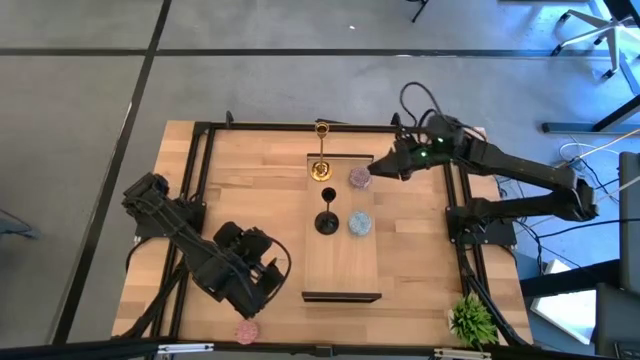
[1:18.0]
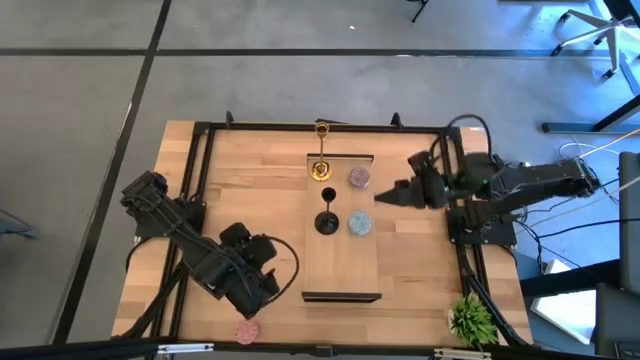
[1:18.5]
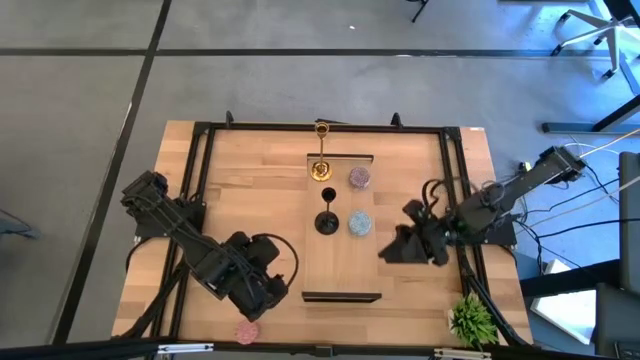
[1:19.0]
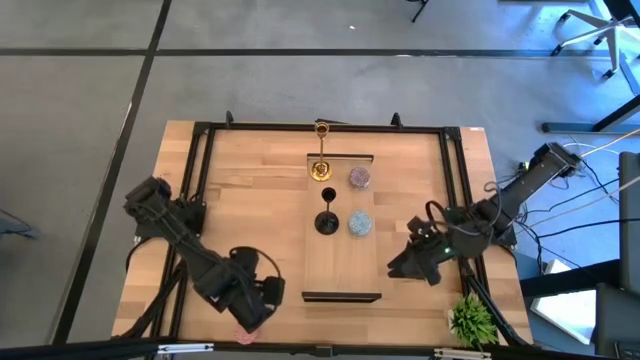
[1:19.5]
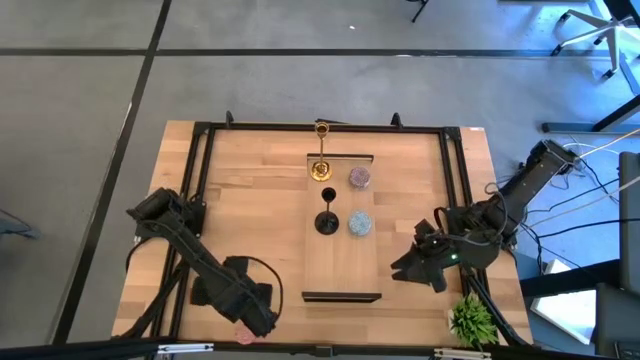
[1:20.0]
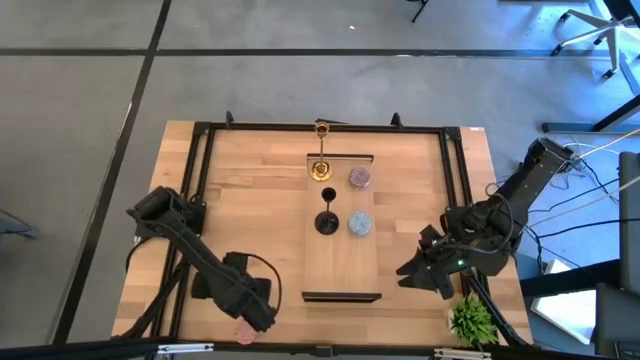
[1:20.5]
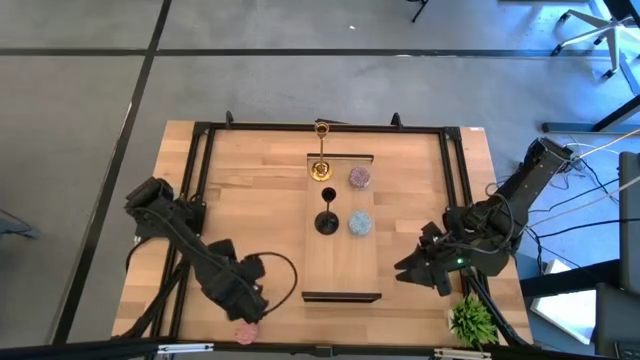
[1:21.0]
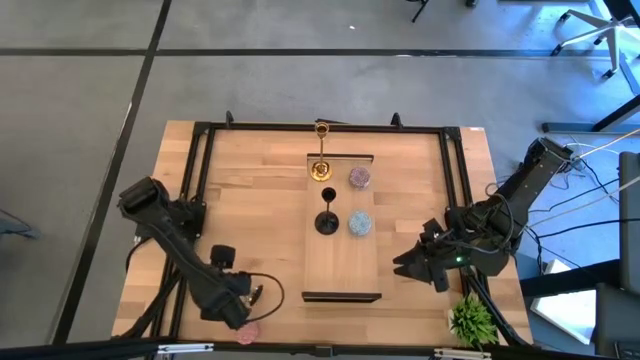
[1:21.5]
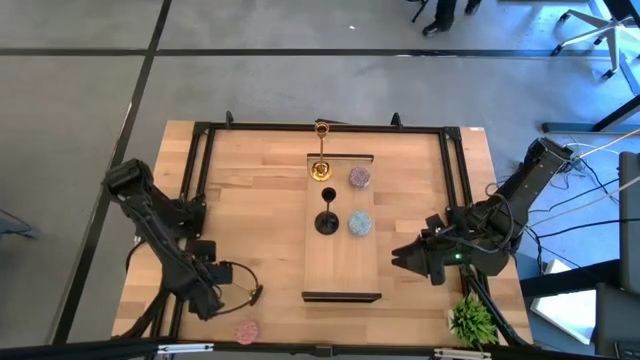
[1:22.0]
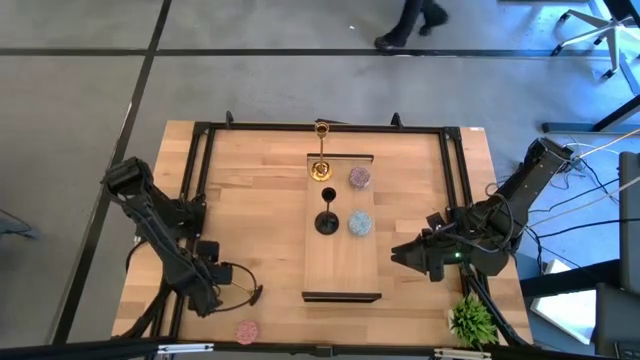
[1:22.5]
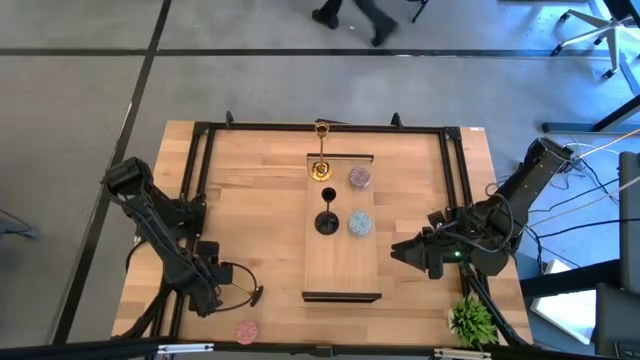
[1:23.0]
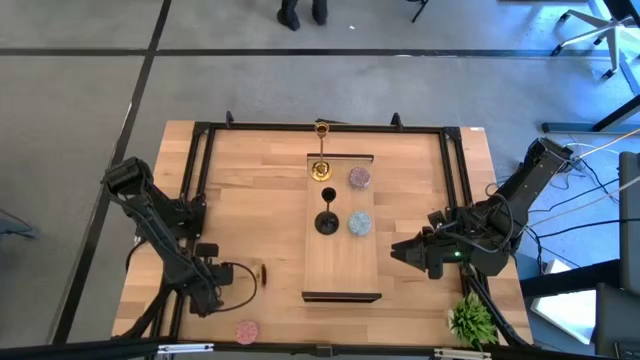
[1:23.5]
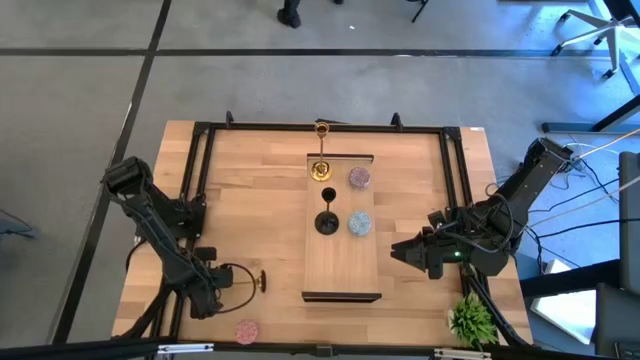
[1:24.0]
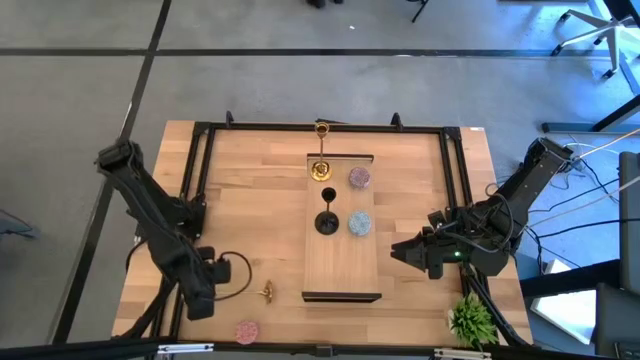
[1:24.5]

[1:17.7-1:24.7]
Task: Pick & Place candle stick holders
Put the golden candle holder on the shelf

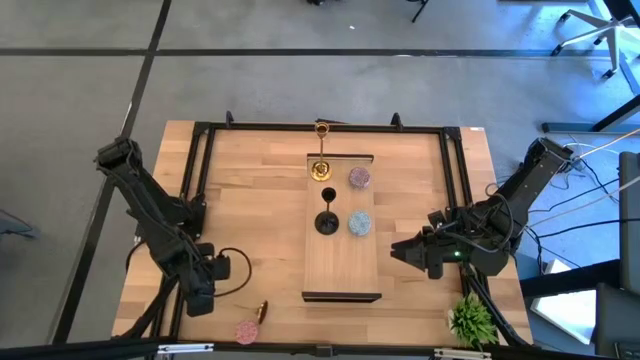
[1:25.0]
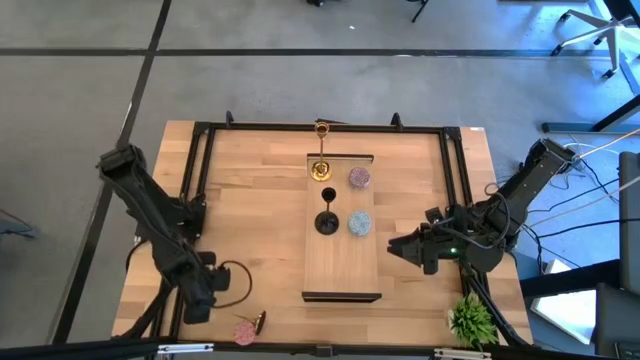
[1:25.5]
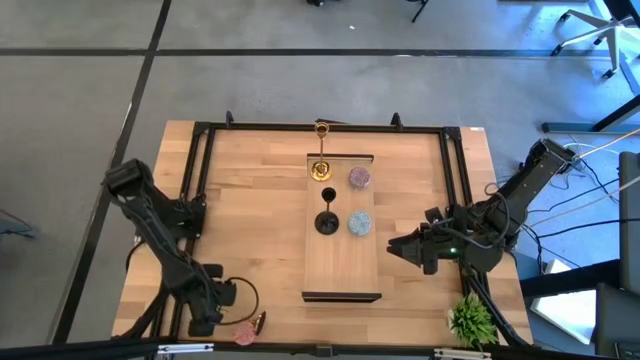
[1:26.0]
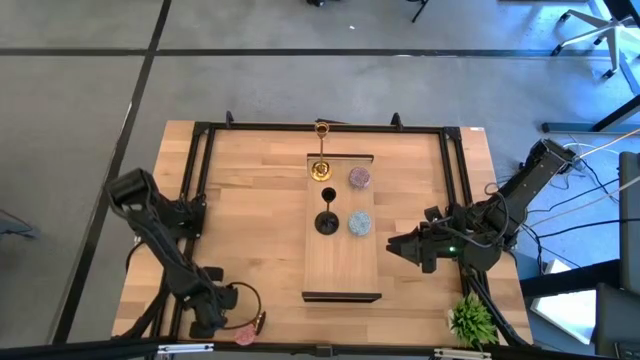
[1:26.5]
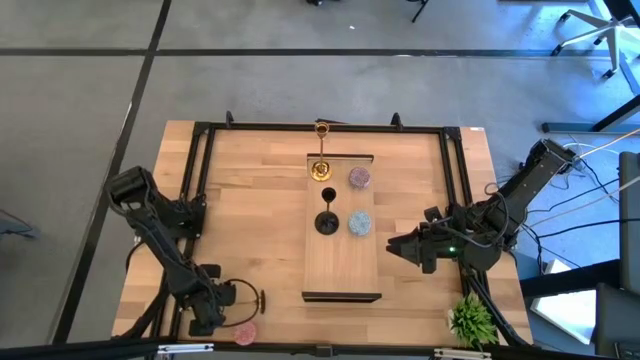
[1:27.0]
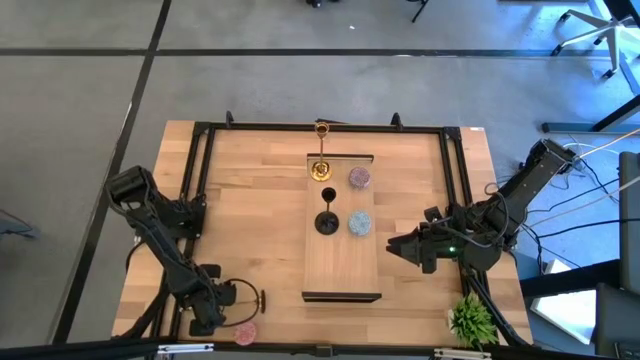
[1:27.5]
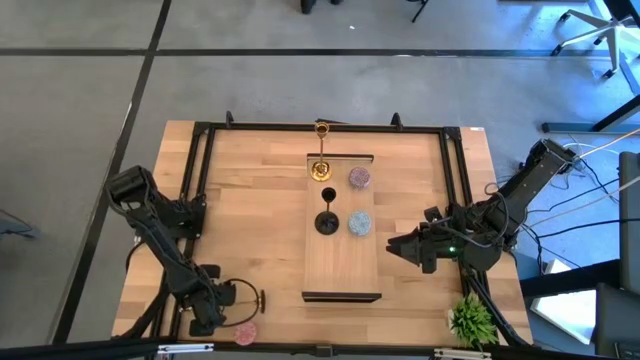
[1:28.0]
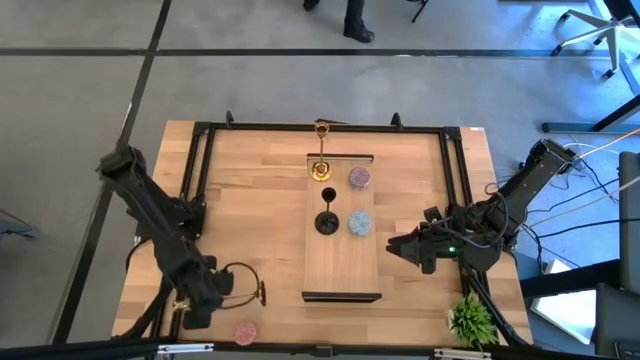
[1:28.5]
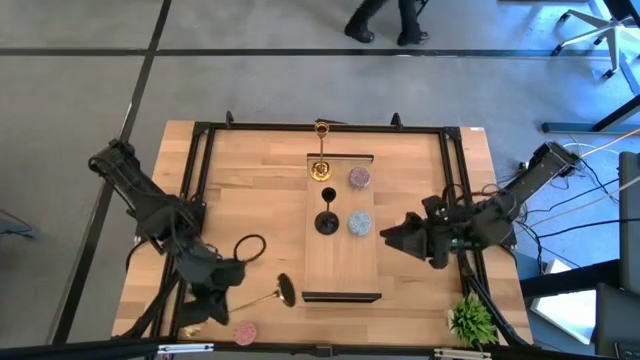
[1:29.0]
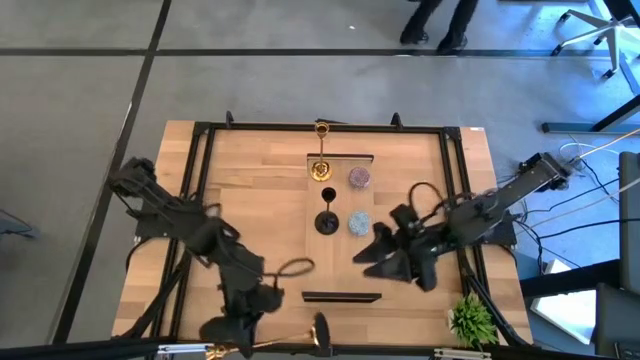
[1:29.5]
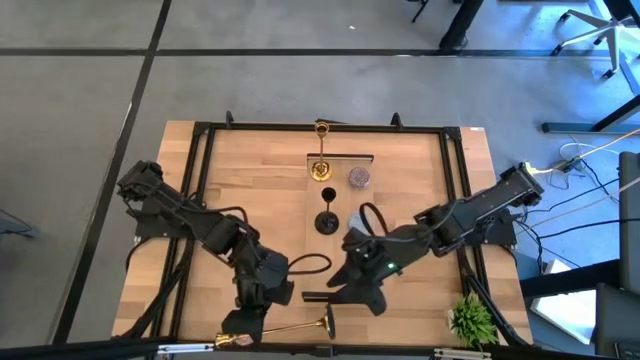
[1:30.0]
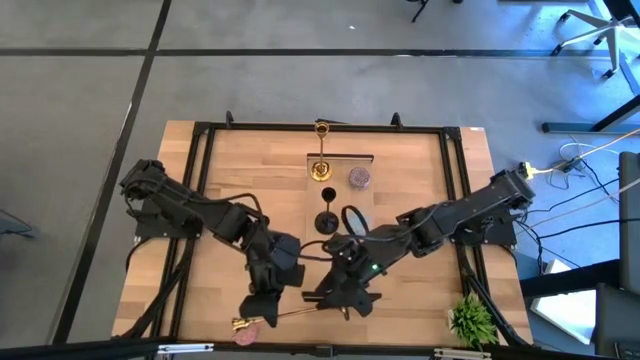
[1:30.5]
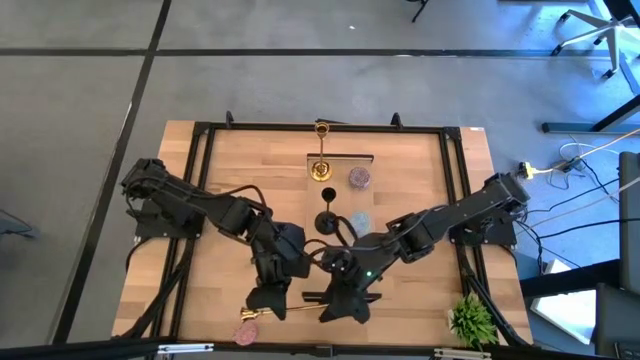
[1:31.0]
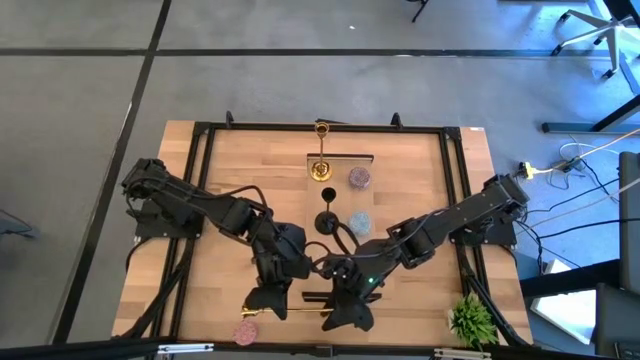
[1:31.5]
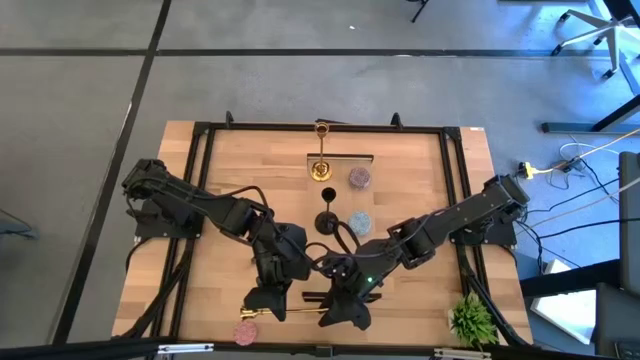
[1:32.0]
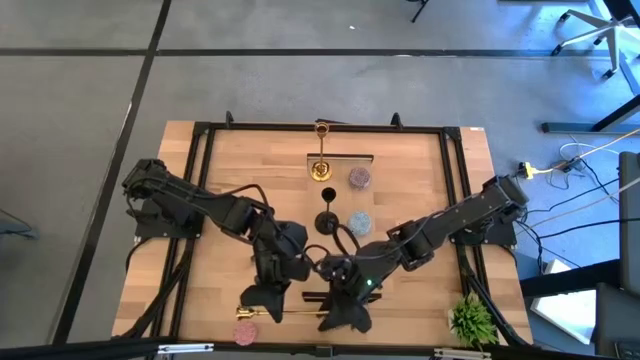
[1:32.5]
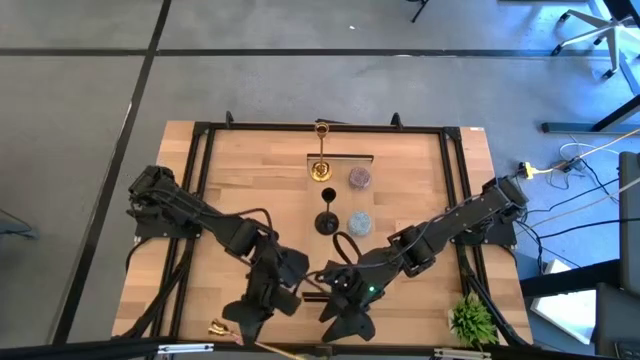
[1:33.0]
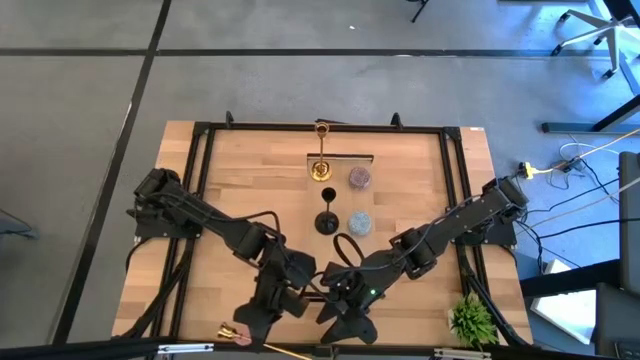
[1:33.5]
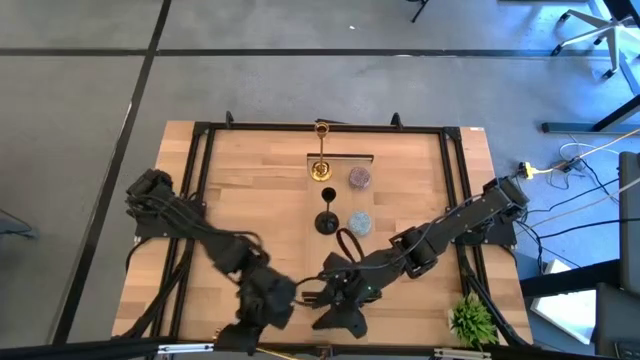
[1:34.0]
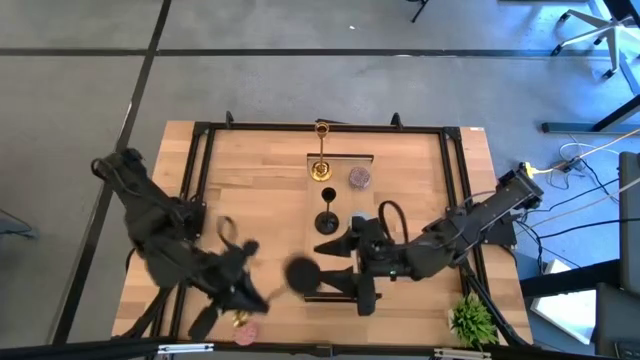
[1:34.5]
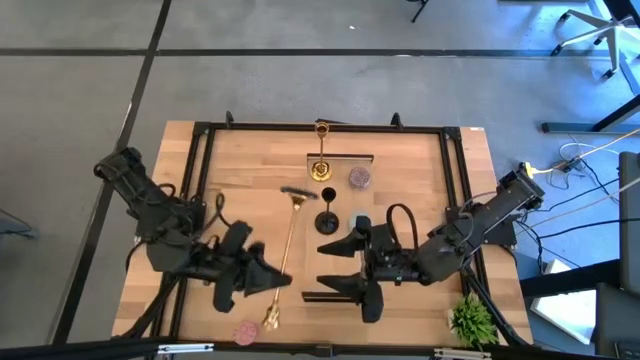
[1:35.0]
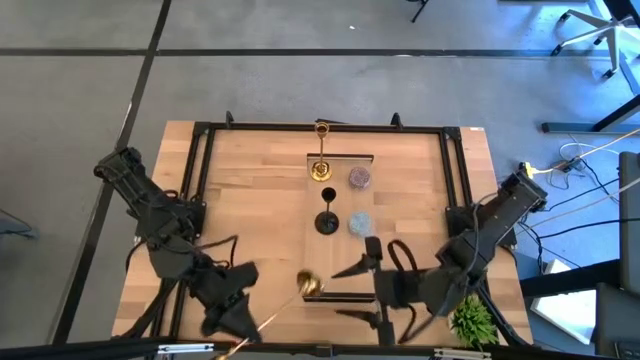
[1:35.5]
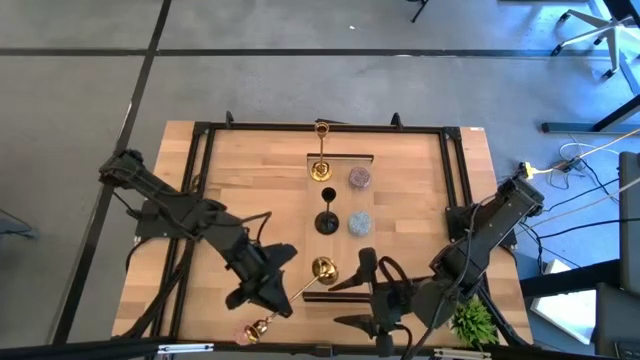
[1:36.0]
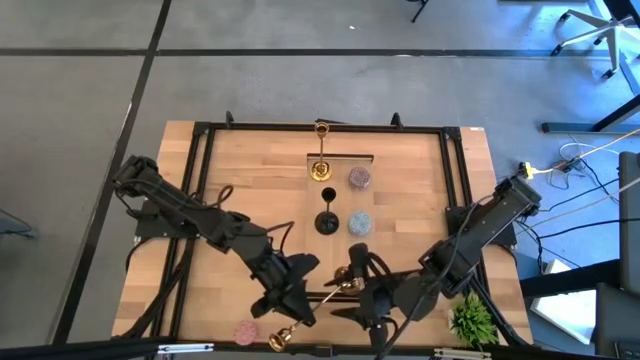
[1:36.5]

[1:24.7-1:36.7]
Put the golden candle holder on the shelf

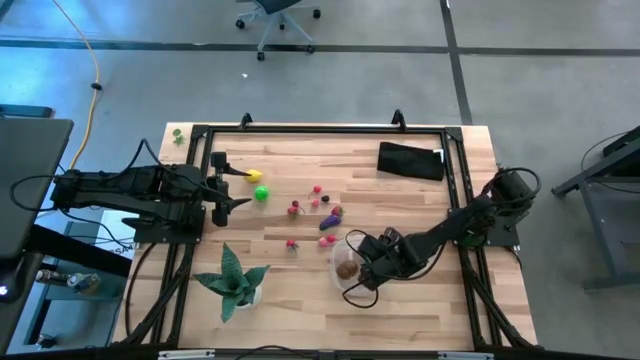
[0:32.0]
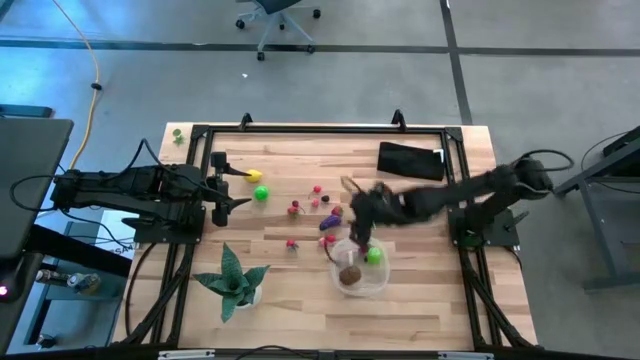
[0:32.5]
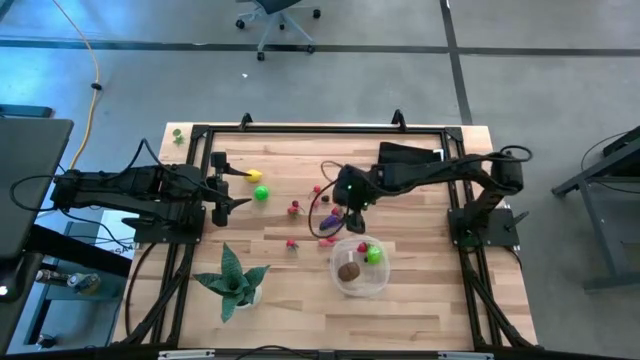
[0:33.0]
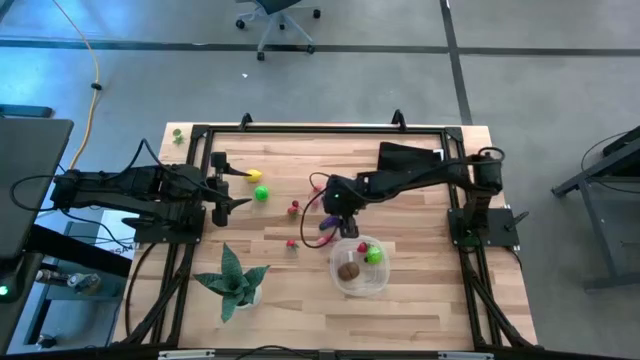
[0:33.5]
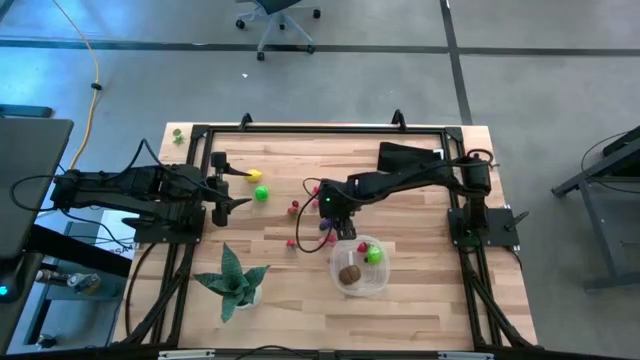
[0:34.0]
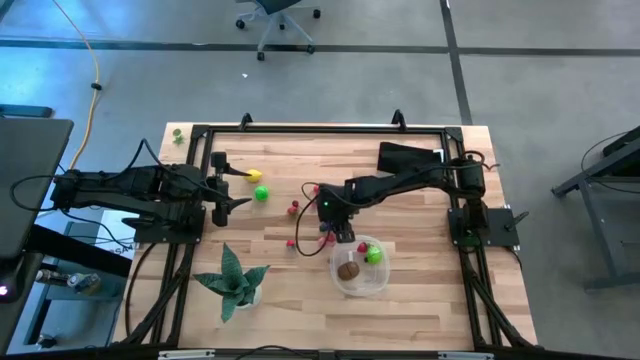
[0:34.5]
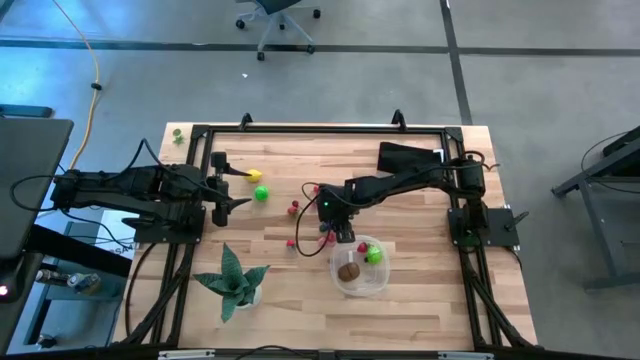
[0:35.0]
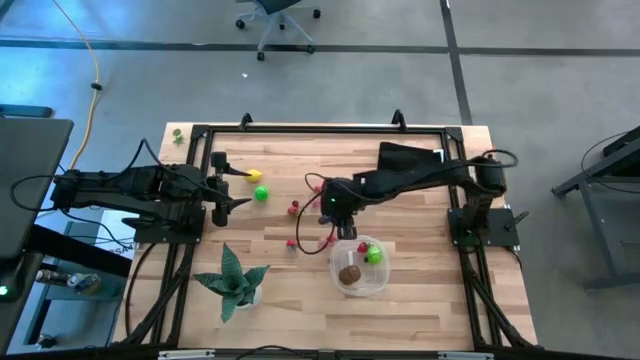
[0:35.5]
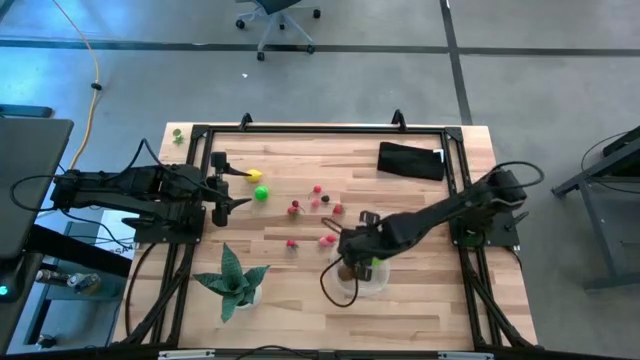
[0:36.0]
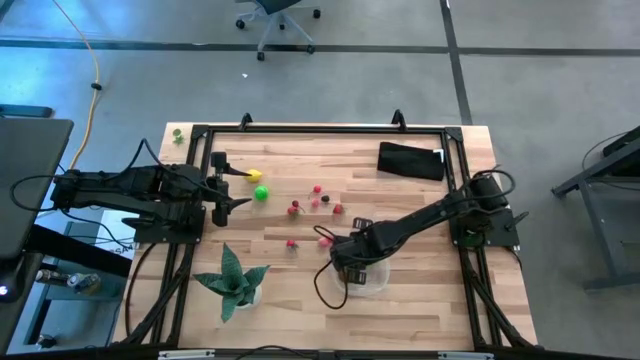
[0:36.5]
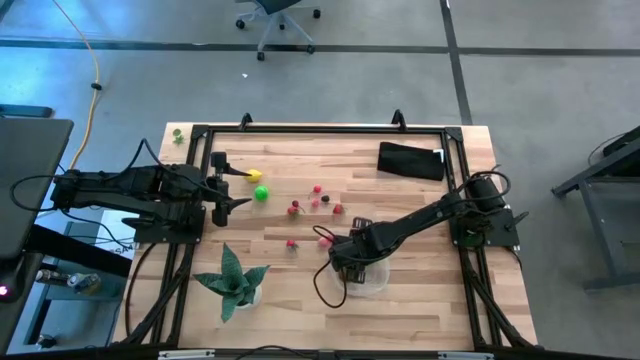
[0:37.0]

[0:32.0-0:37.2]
Task: Pick and placing Produce into tupperware
Put the eggplant into the transparent bin
